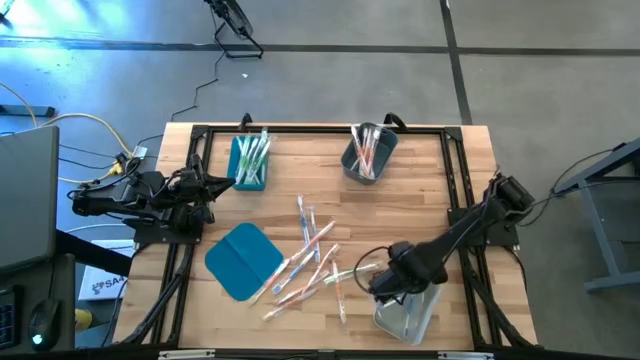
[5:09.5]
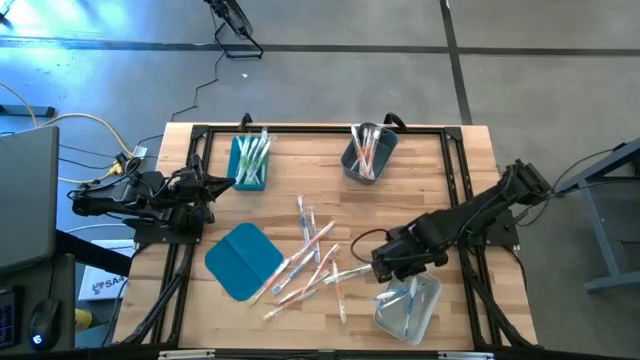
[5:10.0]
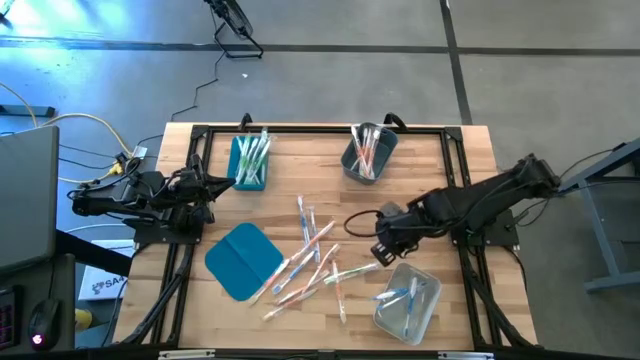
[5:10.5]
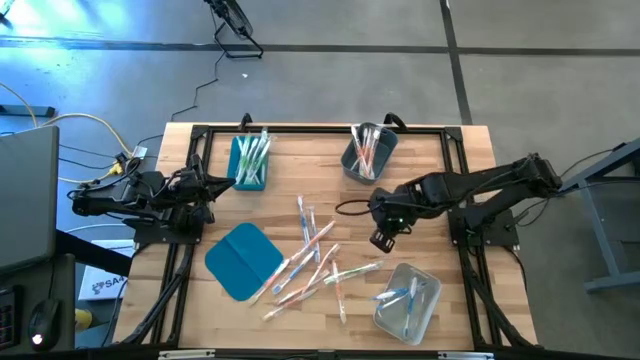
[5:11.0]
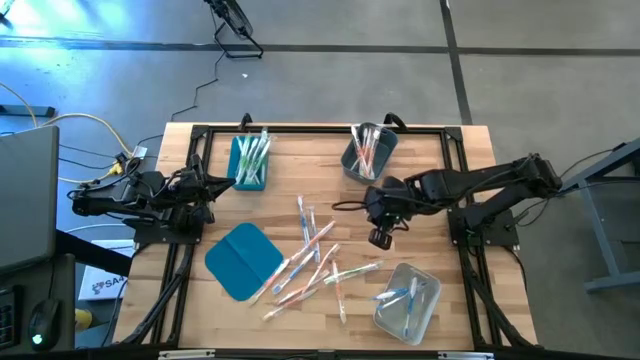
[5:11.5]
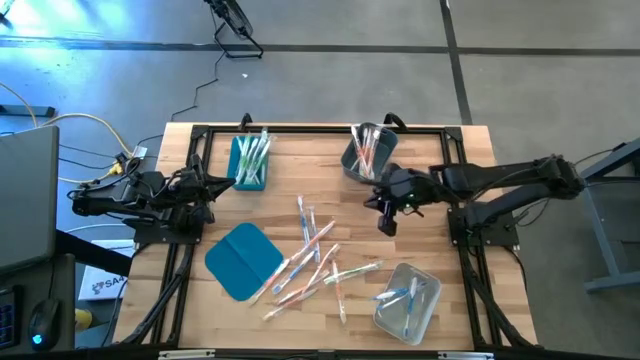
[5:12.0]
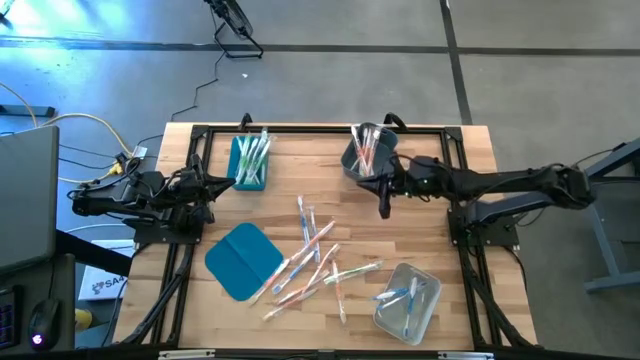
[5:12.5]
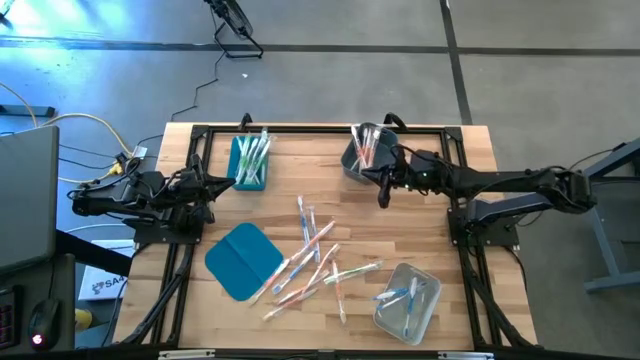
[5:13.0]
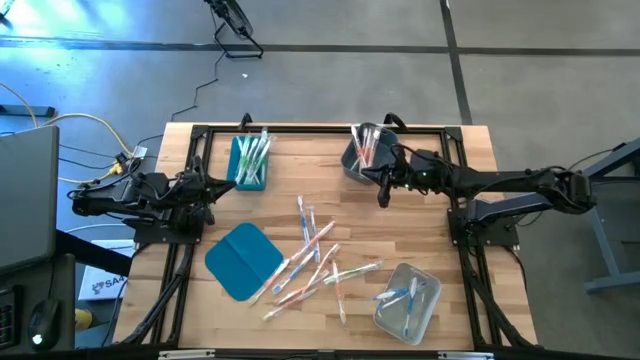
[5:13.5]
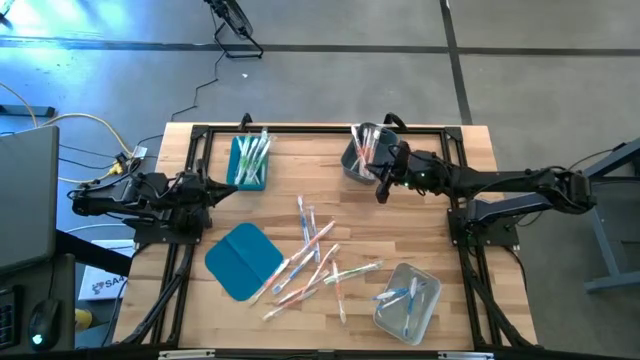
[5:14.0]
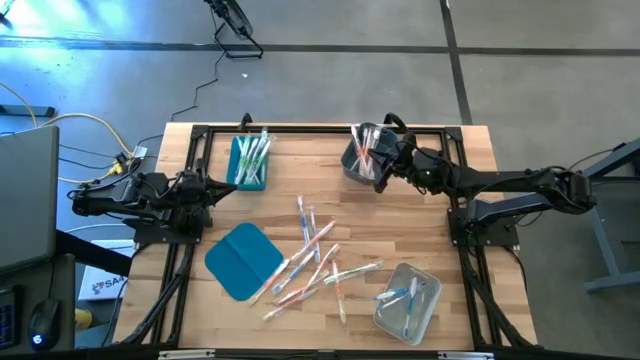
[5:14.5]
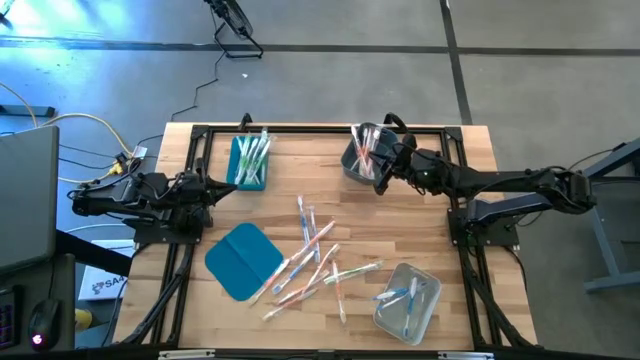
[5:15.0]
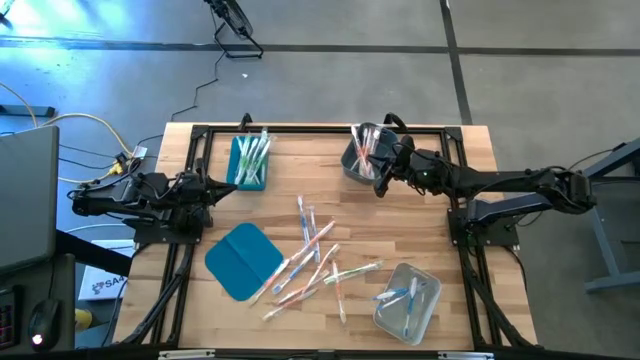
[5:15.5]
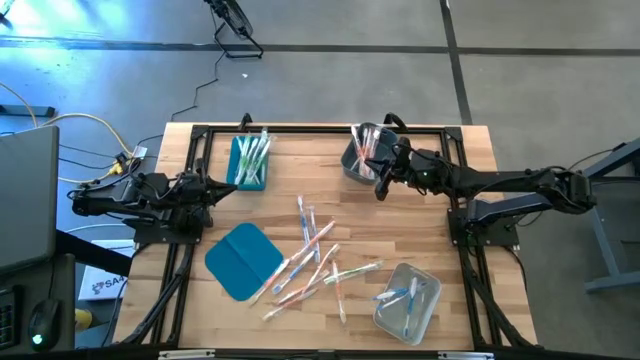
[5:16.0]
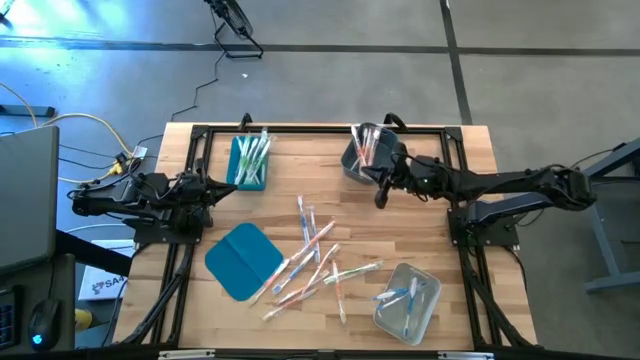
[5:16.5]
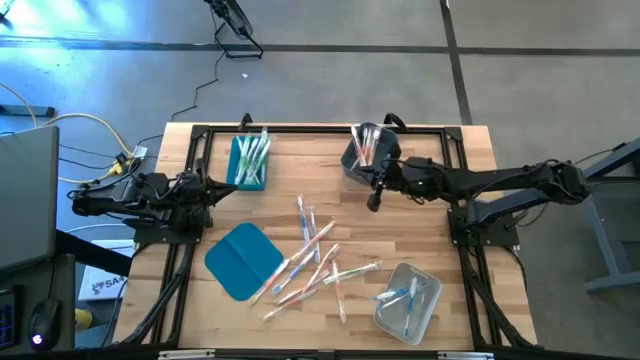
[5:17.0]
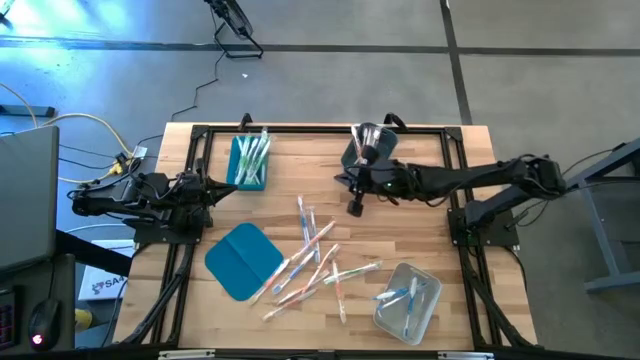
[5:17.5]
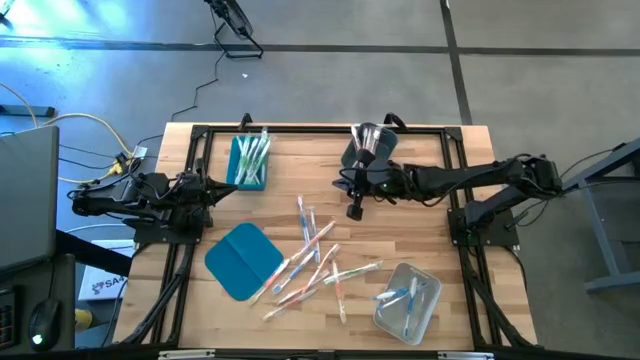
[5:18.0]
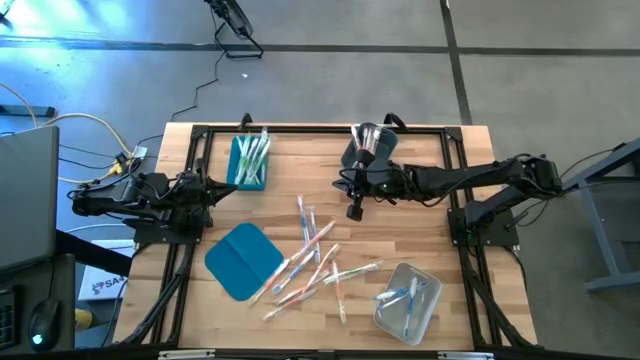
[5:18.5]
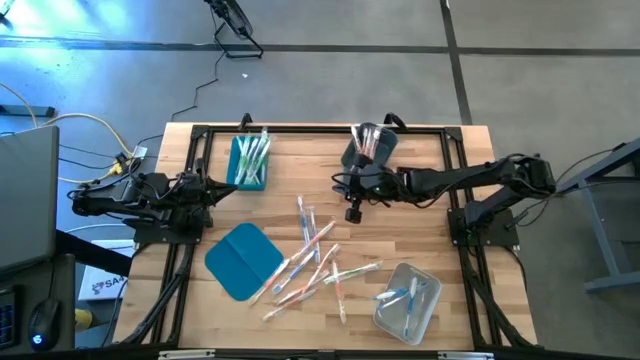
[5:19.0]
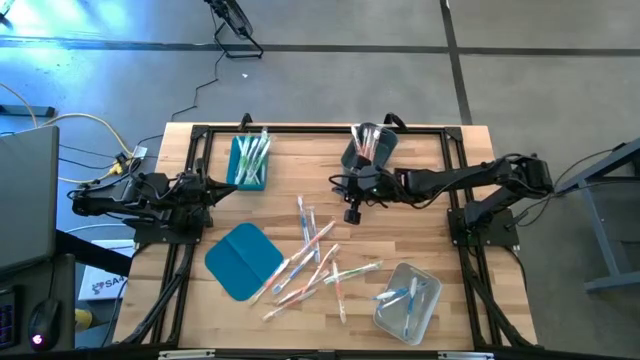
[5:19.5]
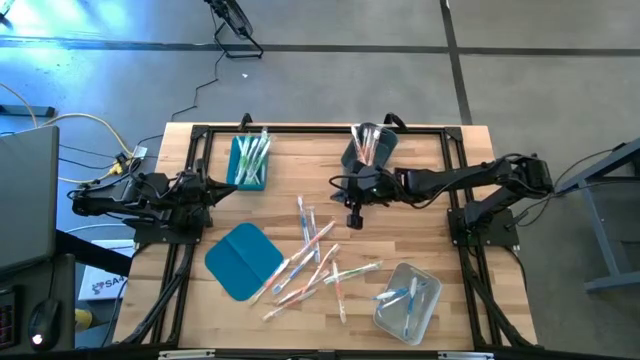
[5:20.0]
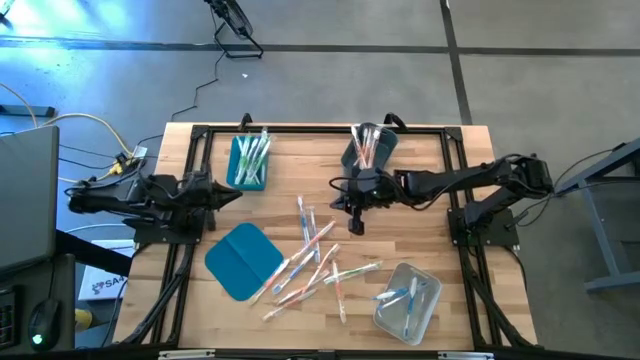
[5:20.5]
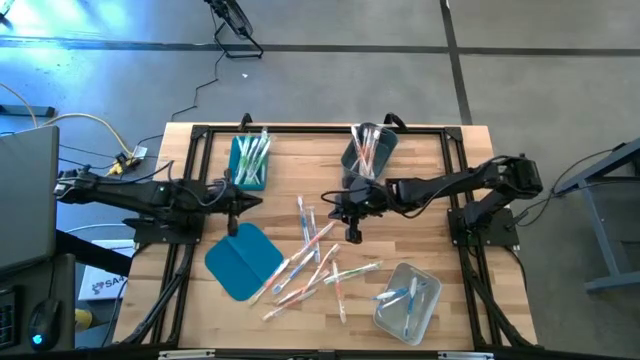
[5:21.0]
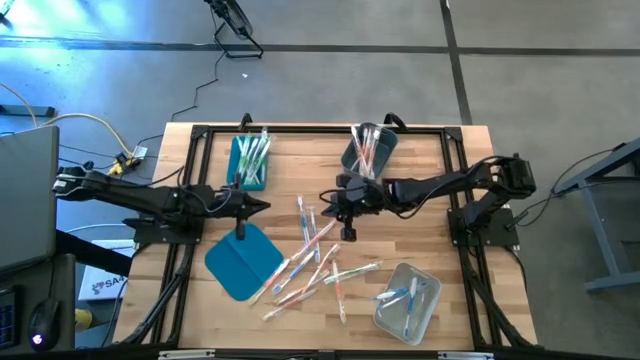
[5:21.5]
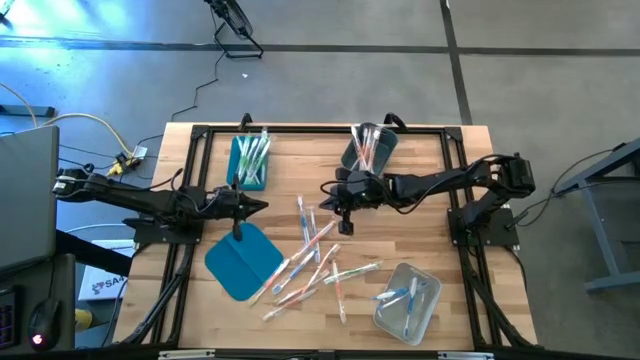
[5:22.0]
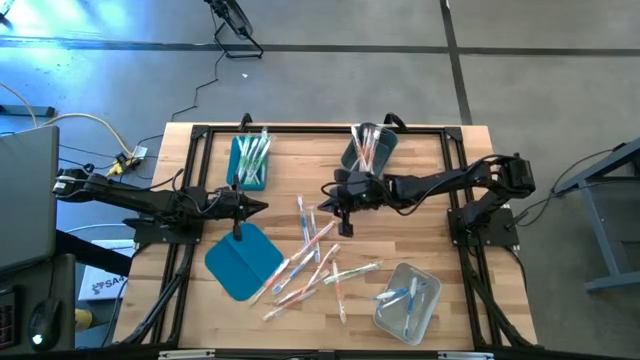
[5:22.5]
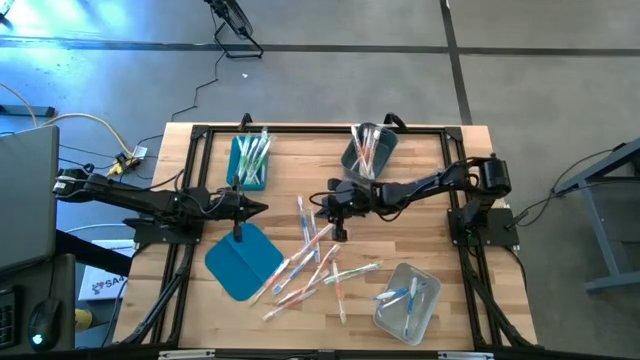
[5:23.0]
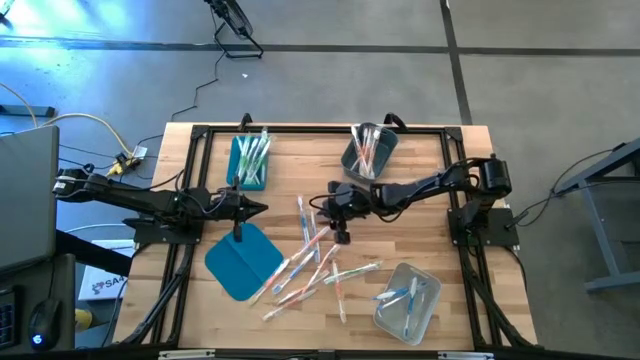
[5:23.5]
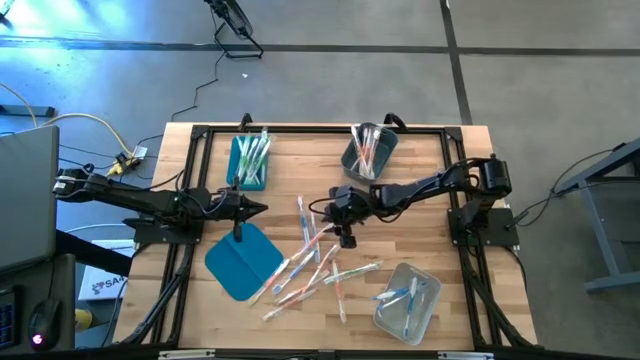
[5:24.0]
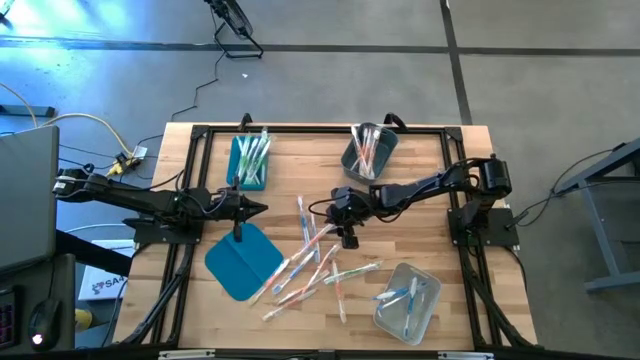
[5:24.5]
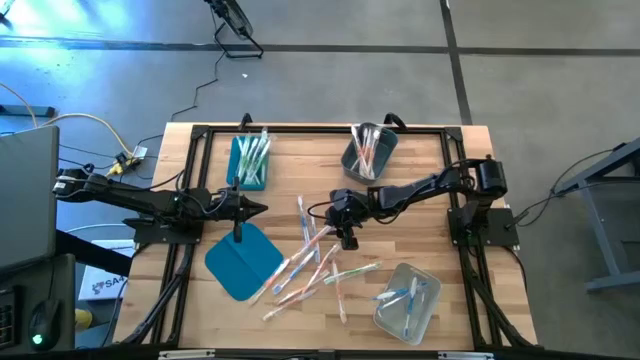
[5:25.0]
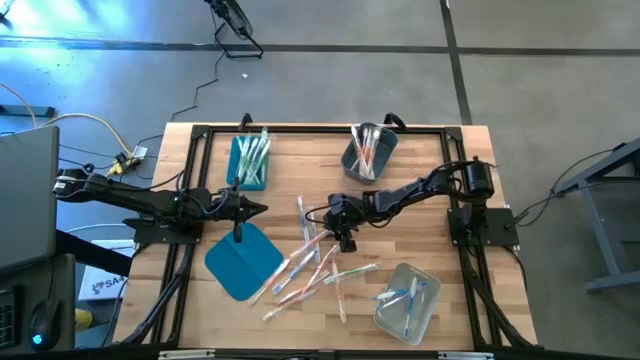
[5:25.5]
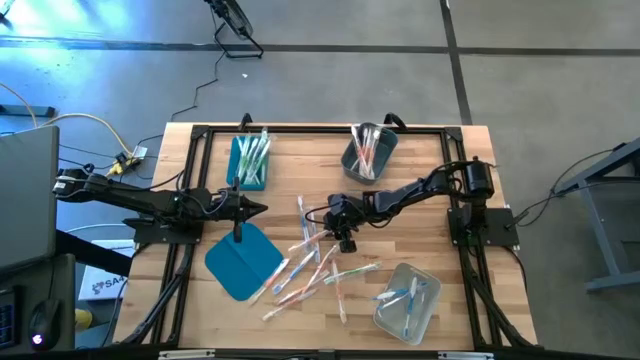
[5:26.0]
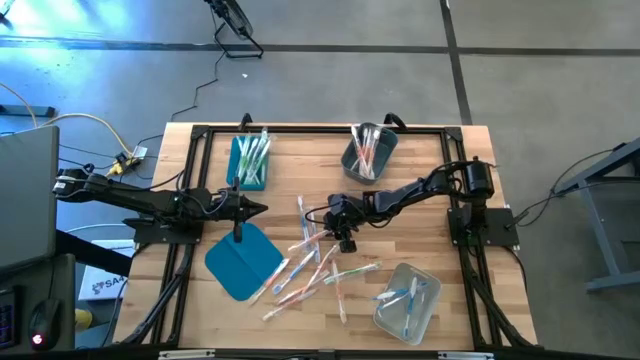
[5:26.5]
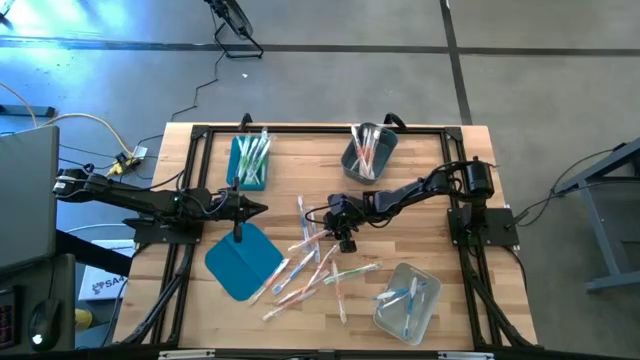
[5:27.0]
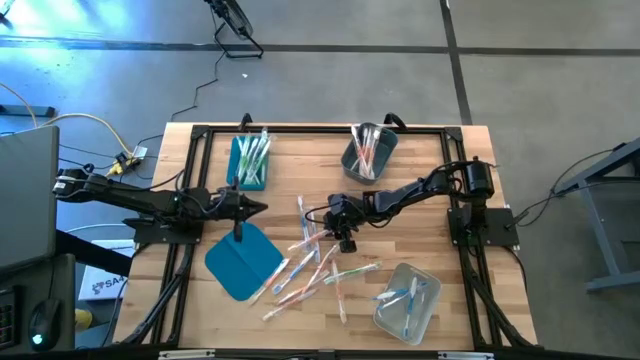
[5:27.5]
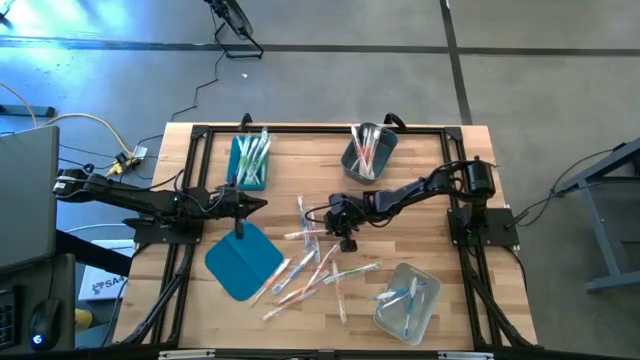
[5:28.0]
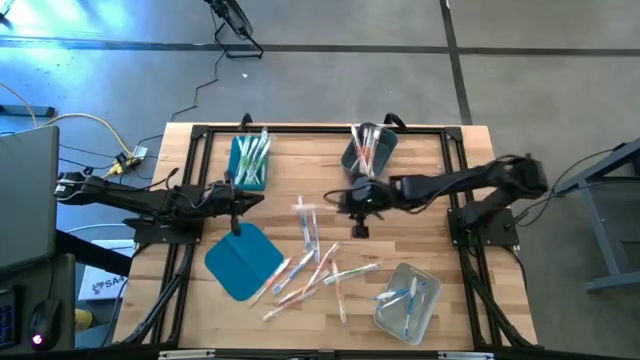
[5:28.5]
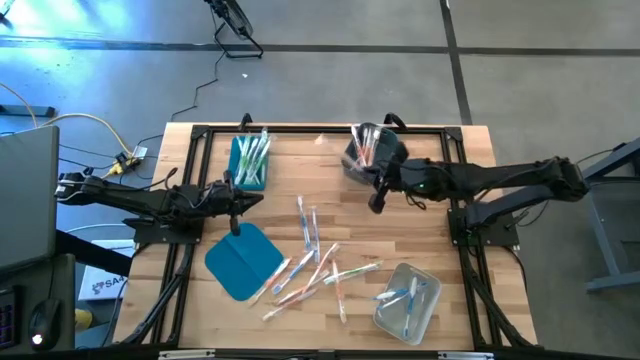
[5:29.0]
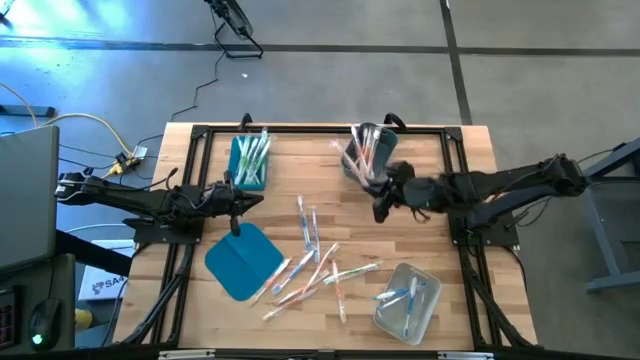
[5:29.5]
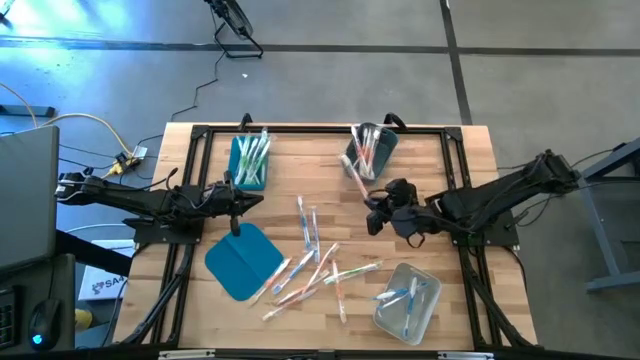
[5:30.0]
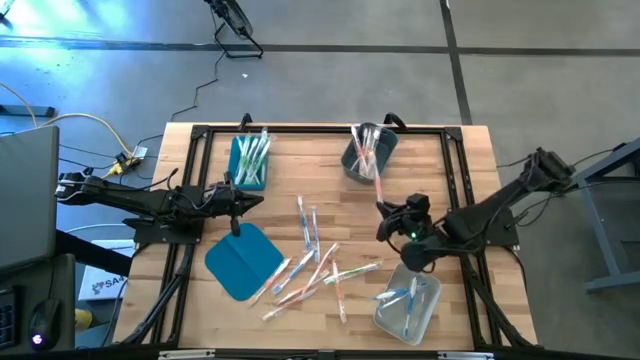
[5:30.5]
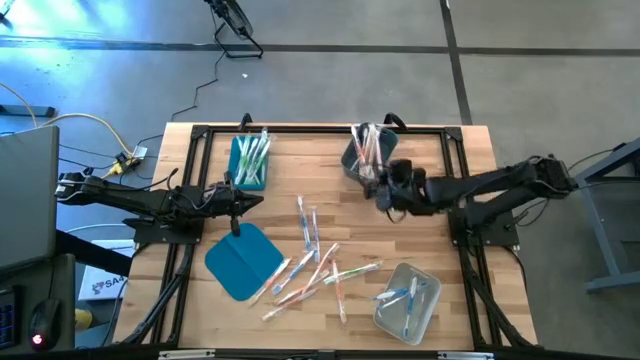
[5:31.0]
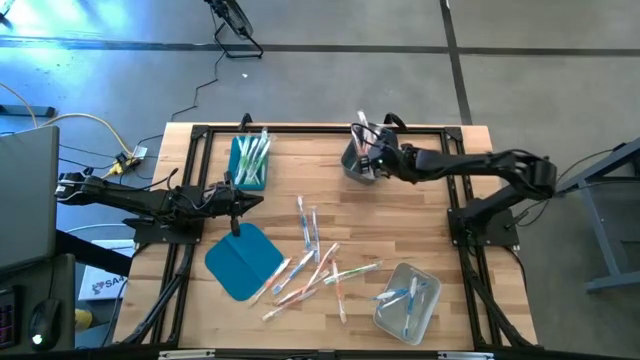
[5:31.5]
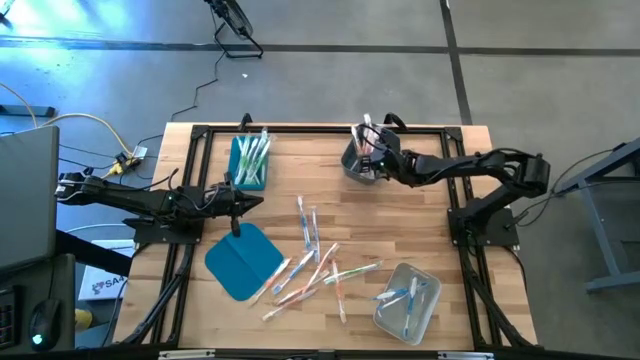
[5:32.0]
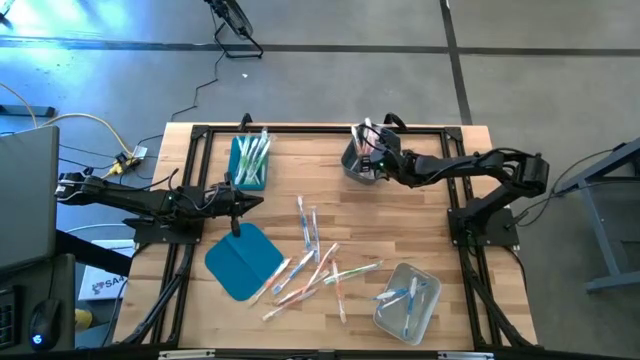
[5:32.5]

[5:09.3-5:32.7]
Task: Pick & Place Toothbrushes
Put the orange toothbrush into the dark gray bin
